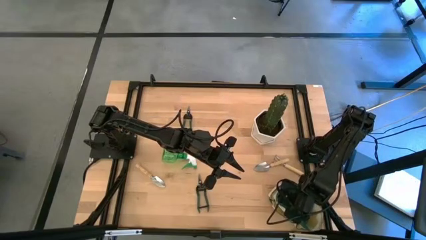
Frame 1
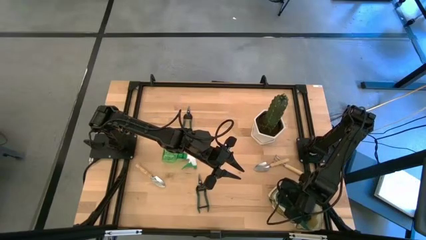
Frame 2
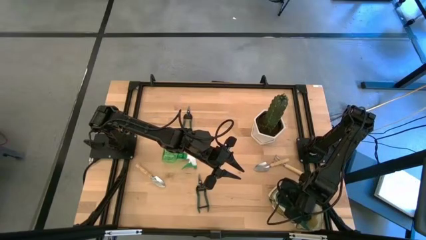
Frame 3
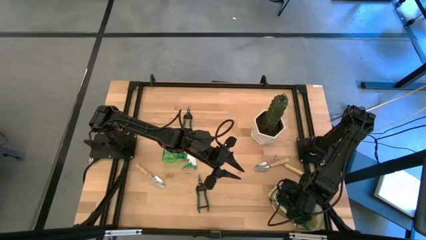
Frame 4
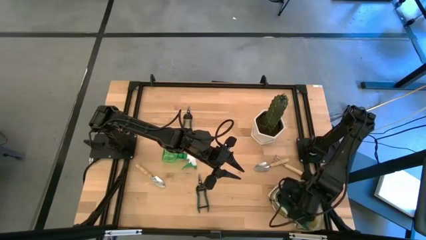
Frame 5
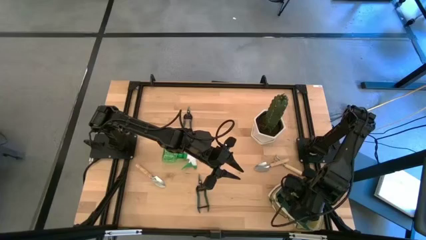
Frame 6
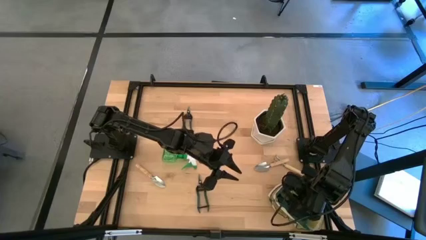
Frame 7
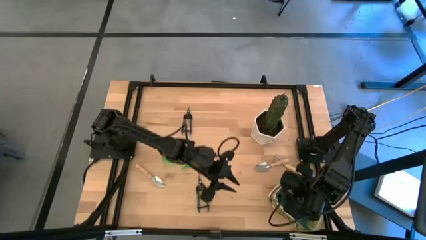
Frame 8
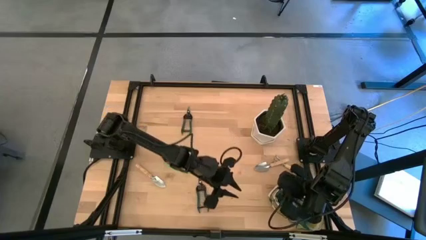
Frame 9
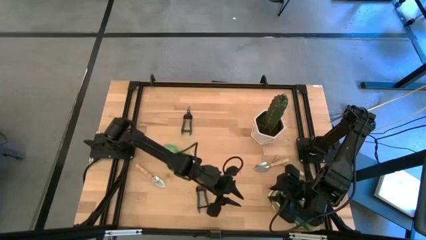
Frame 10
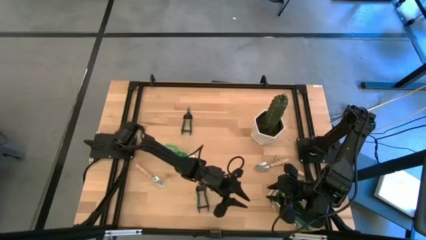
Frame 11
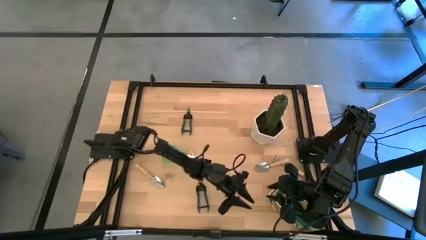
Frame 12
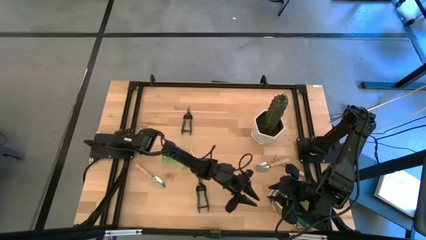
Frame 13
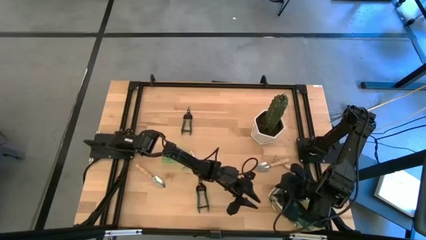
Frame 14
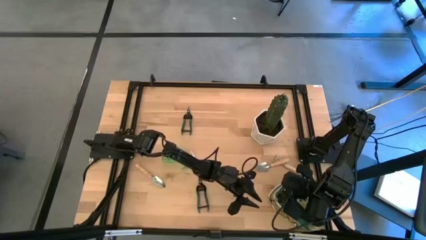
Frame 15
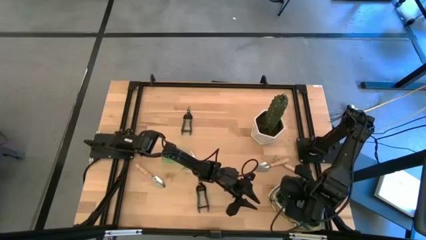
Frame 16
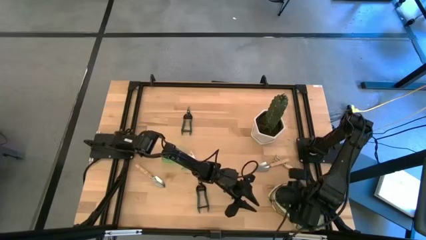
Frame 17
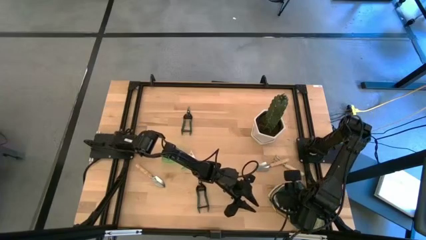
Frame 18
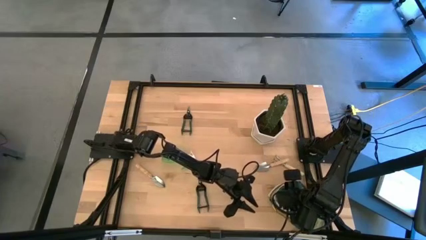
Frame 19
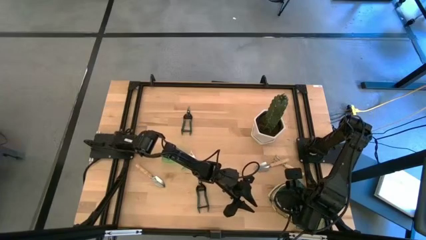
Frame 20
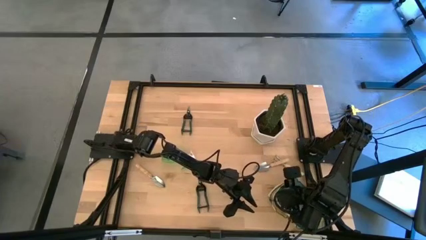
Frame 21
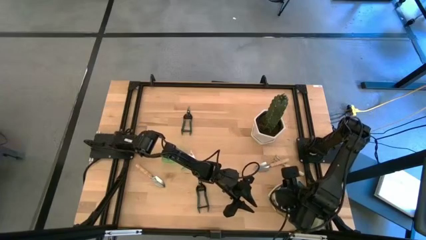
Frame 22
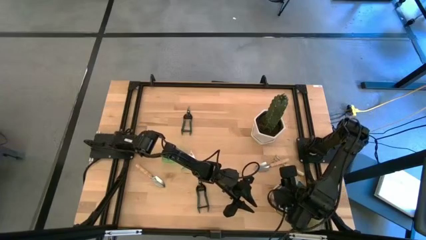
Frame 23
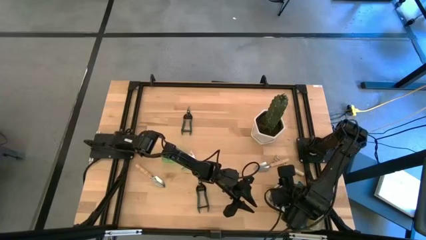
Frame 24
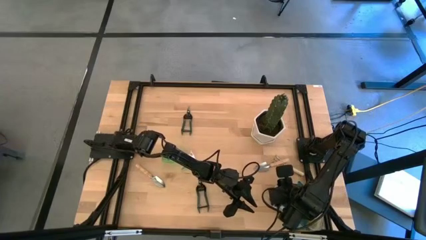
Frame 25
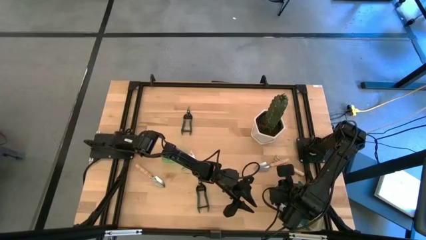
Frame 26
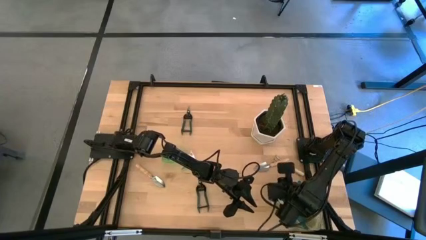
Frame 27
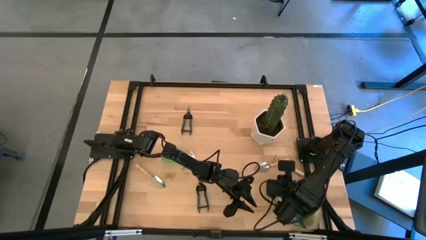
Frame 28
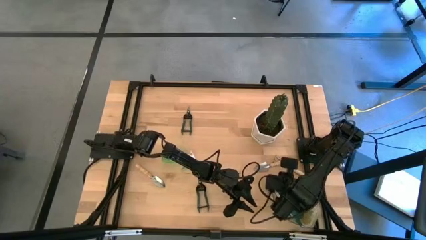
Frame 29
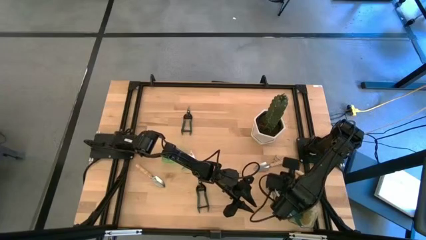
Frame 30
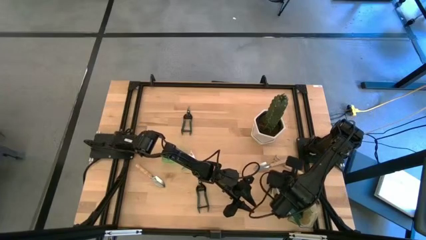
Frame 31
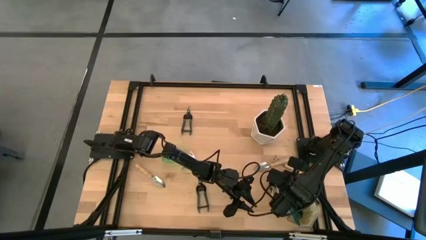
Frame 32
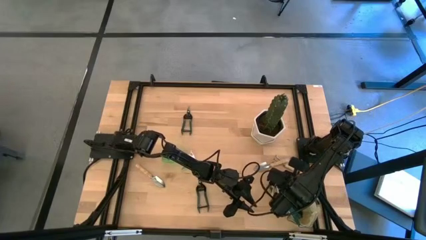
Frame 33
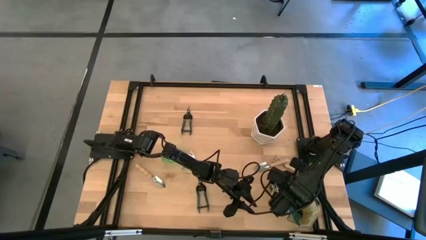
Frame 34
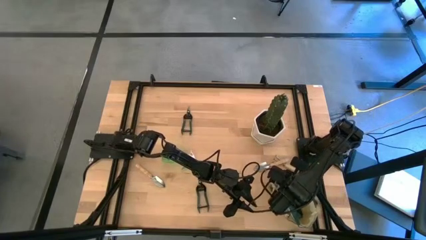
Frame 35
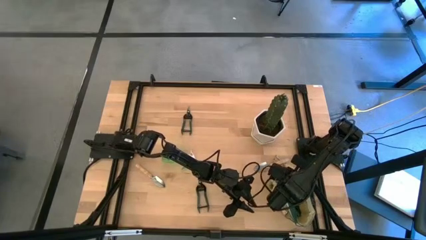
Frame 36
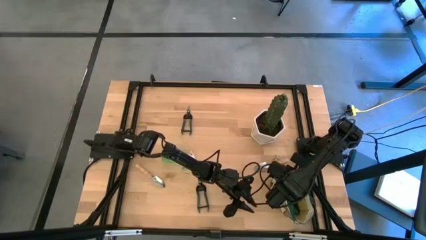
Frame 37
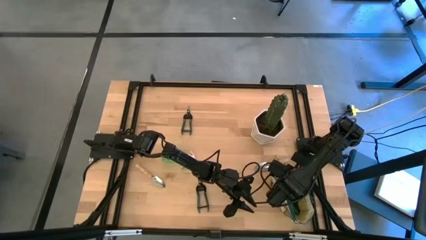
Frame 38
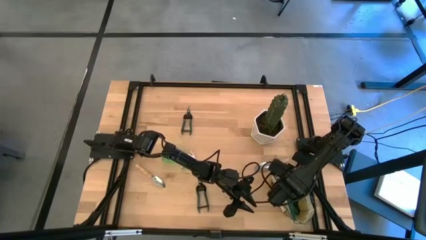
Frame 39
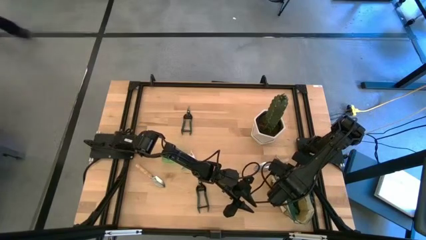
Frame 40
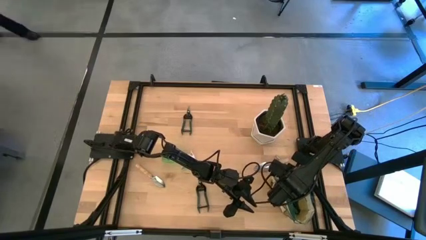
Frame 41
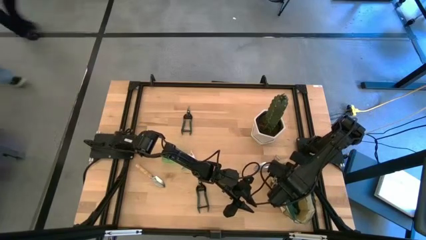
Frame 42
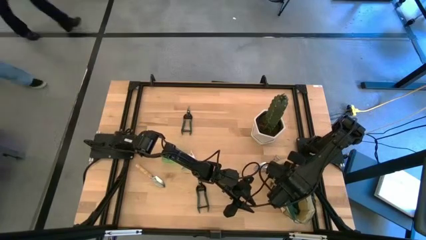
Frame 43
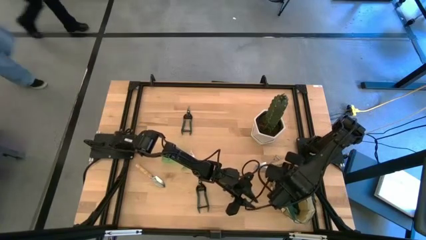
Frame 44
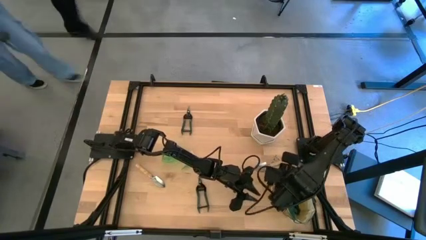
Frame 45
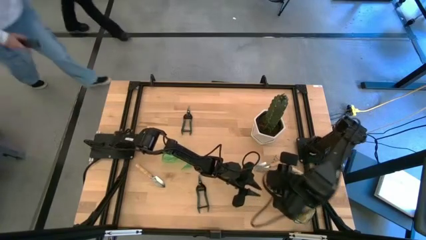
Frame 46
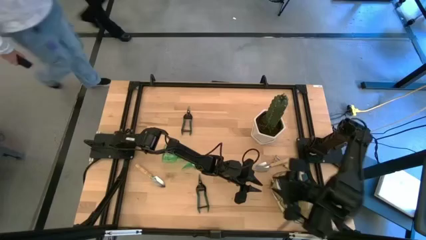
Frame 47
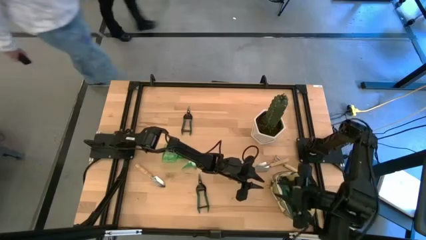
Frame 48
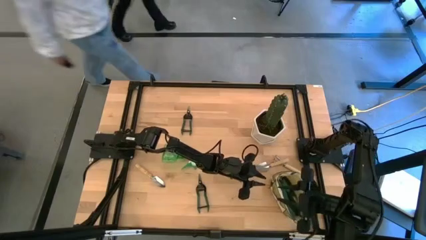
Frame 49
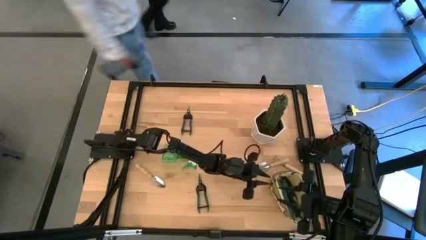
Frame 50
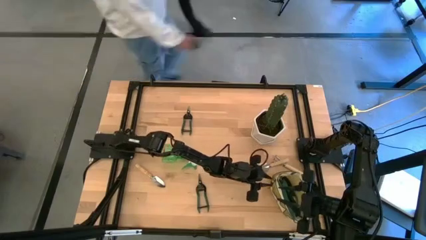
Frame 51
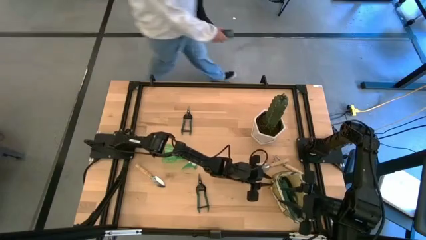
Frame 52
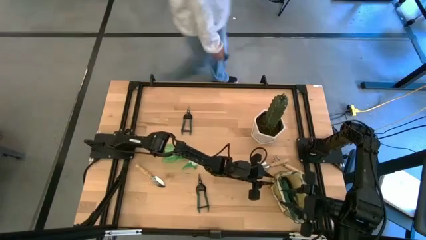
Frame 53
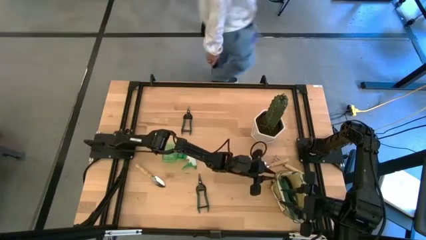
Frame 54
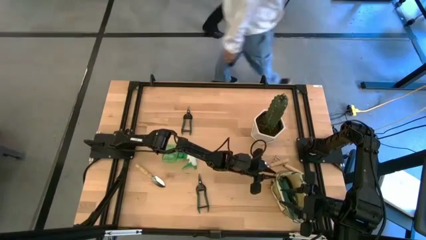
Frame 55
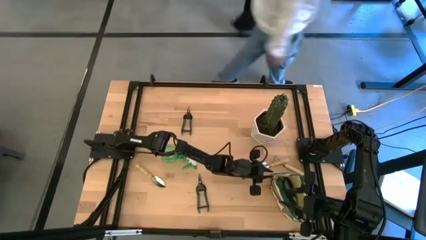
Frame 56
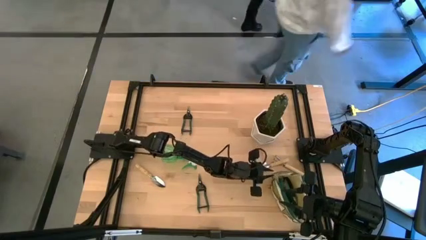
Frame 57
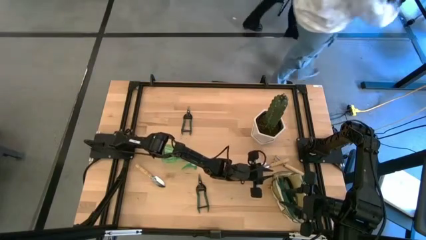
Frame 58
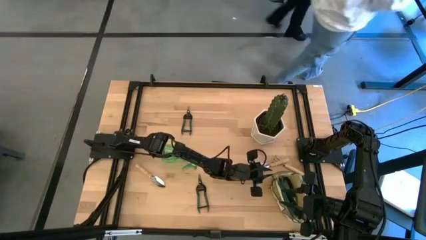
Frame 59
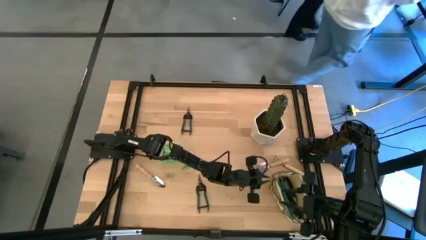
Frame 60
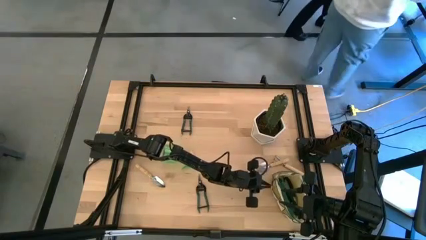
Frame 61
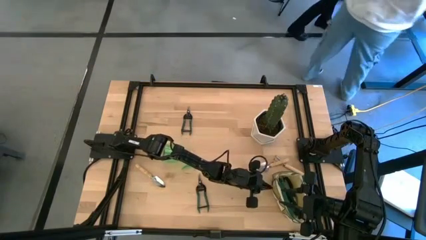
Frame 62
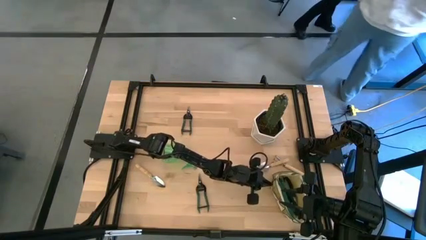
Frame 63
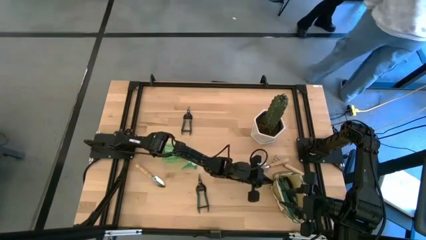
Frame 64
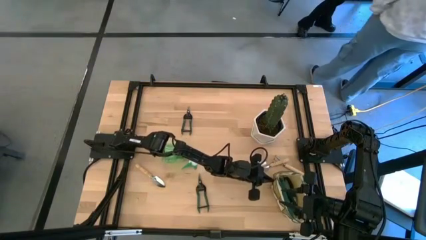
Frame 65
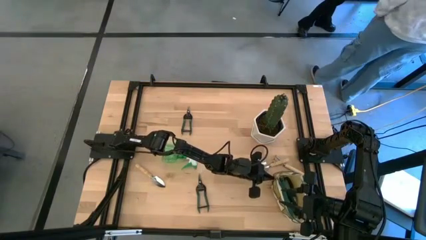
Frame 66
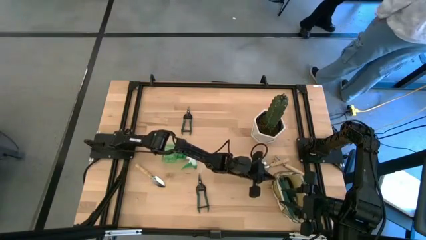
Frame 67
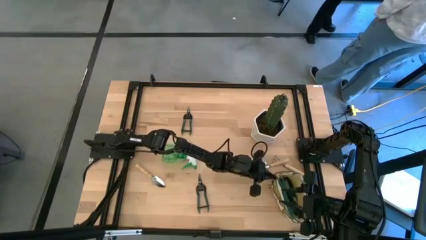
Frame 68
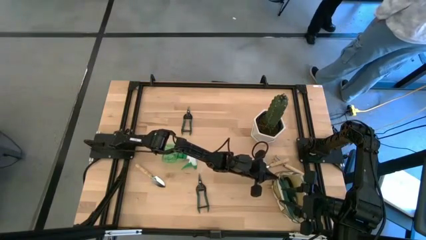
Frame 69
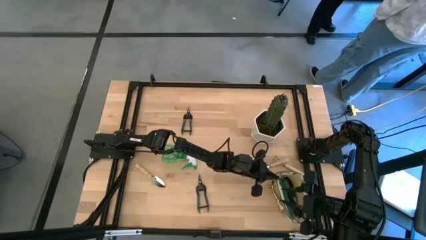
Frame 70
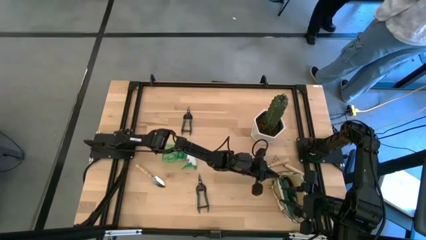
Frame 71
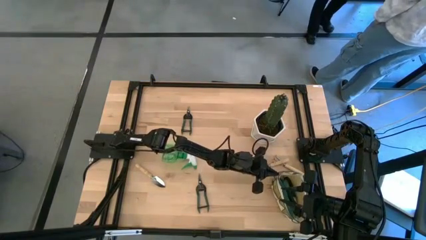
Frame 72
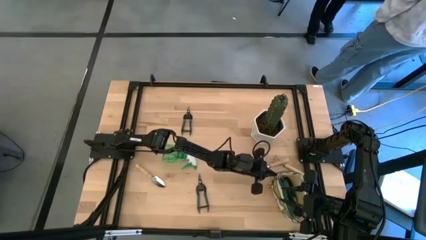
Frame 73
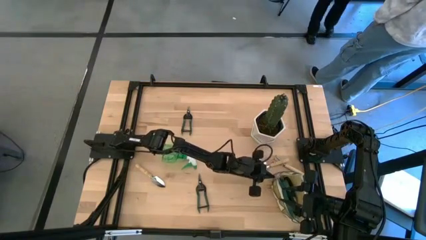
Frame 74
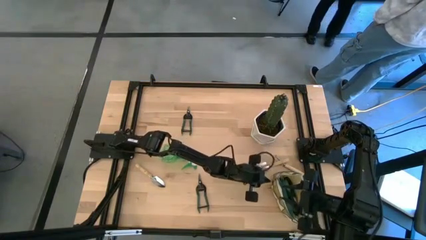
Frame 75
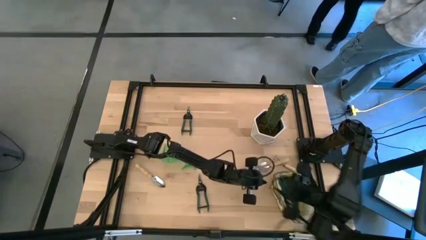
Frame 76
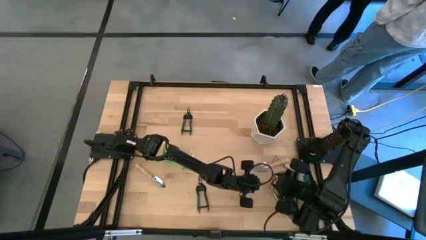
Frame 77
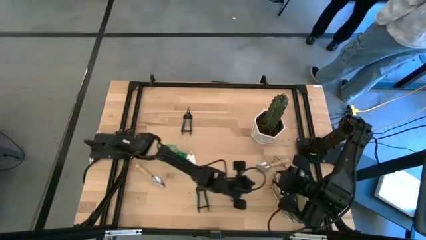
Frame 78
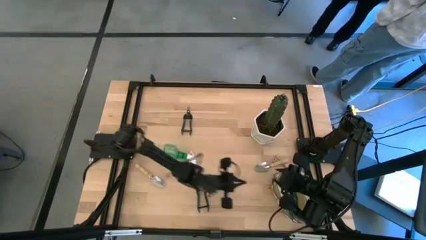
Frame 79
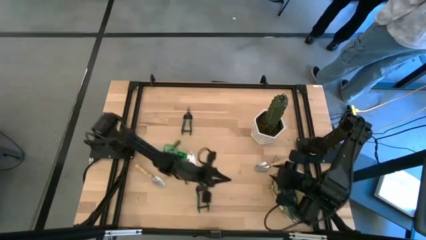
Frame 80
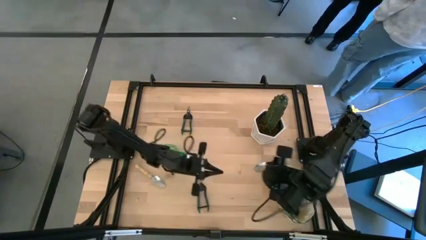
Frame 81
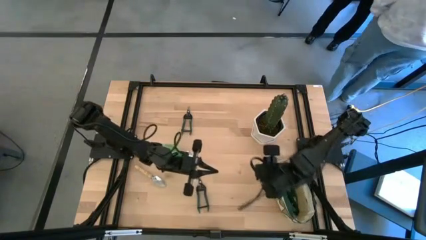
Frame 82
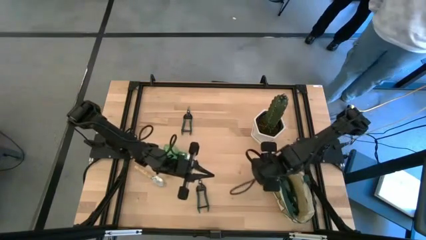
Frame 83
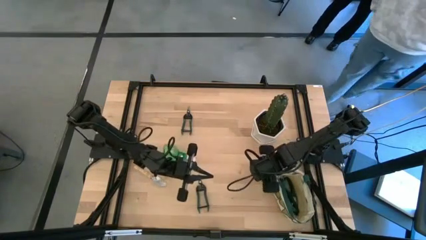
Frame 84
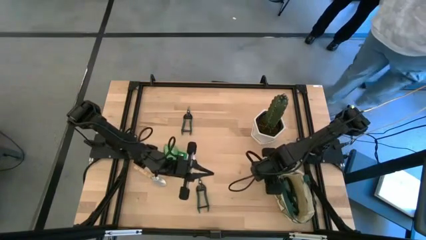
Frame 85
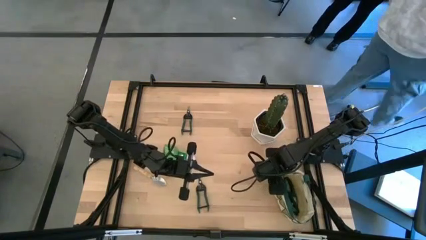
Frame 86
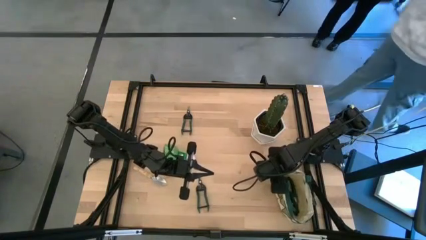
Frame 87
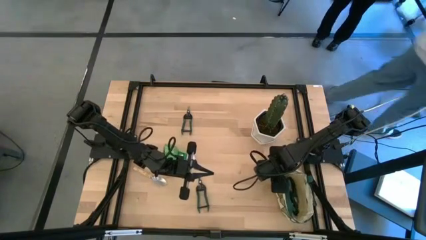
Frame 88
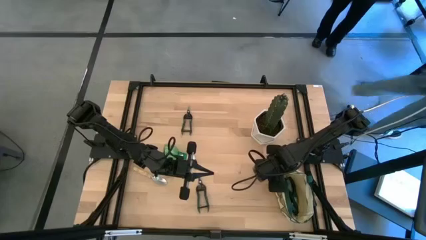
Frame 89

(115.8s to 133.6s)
Task: Pick & Place Garden tools in Gardening bag
Adjust the white bag
